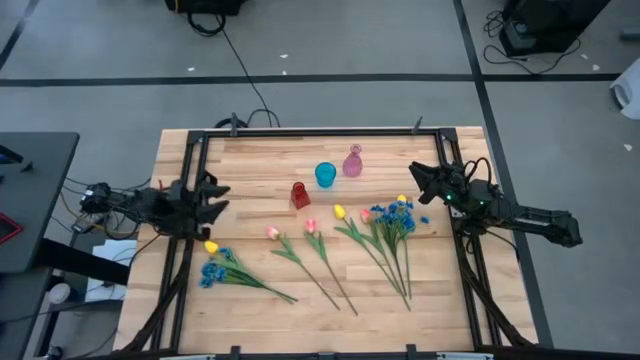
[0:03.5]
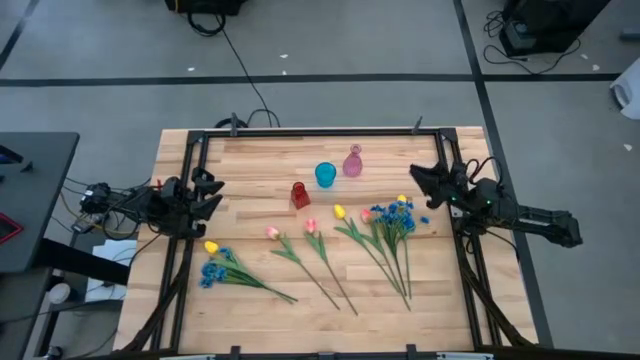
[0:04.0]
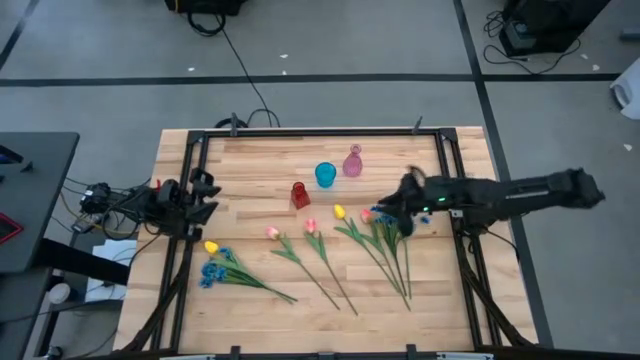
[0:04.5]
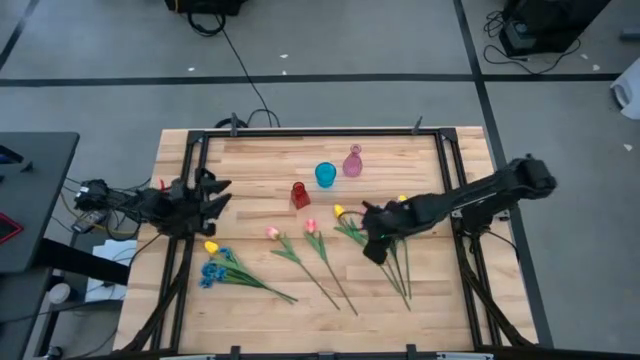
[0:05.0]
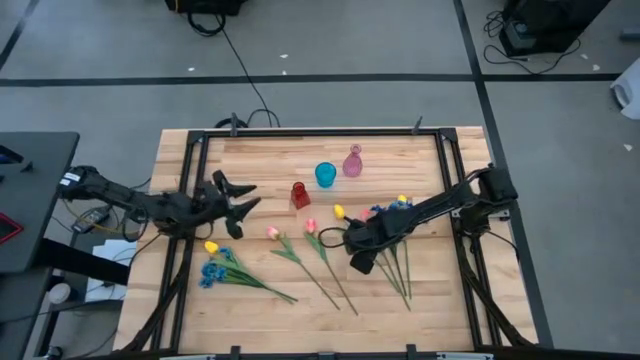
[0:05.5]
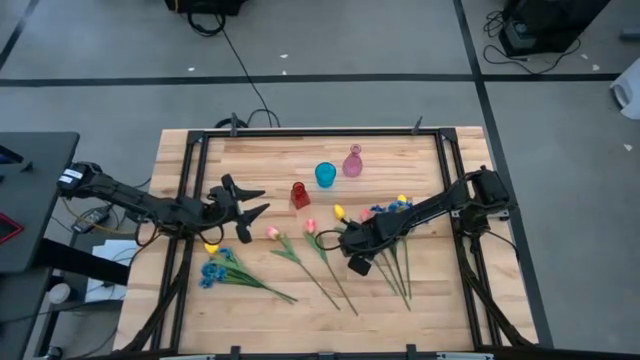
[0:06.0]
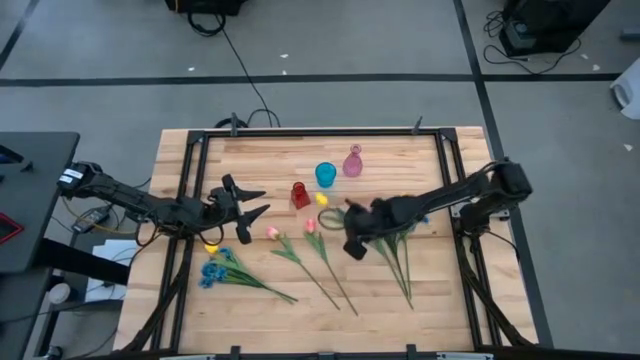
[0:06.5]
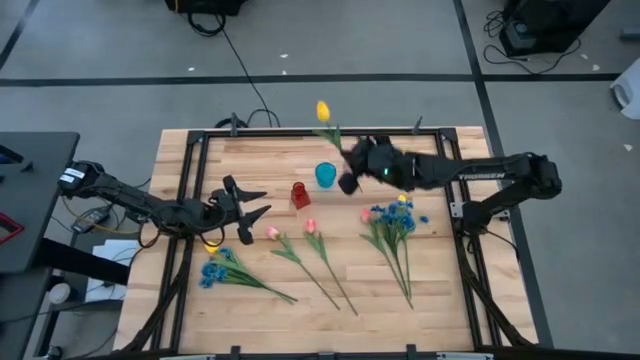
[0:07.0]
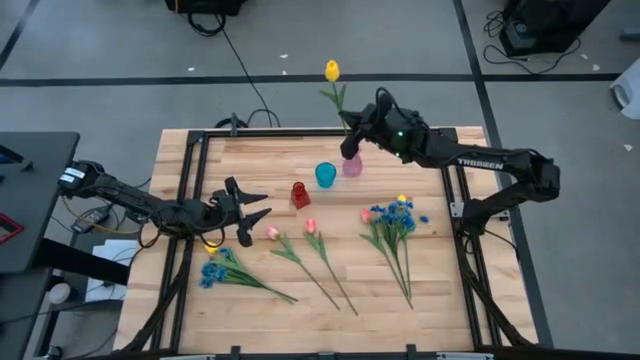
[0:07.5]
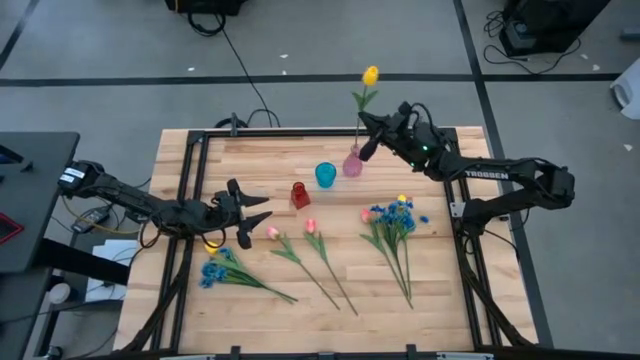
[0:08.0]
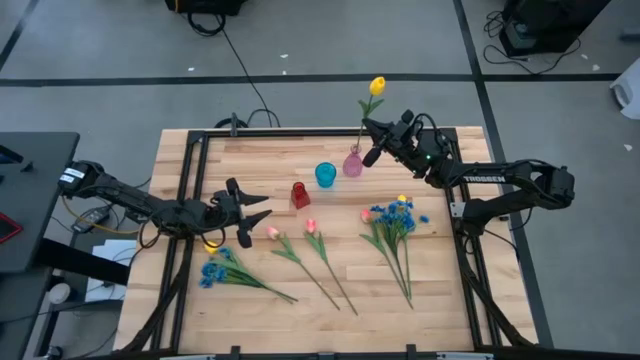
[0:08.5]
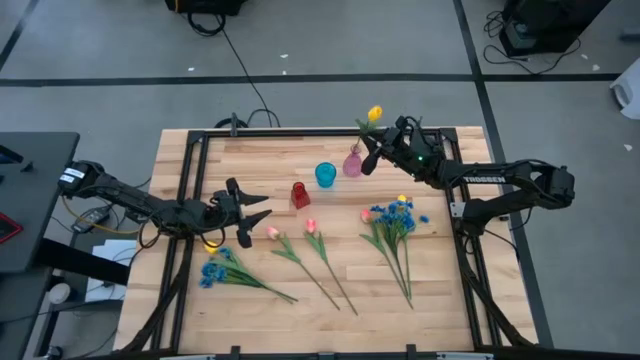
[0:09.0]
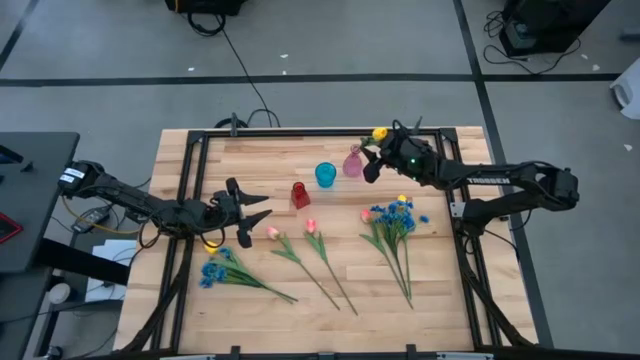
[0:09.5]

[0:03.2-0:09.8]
Task: Sort flowers into vase by color
Put the yellow flower into the purple vase

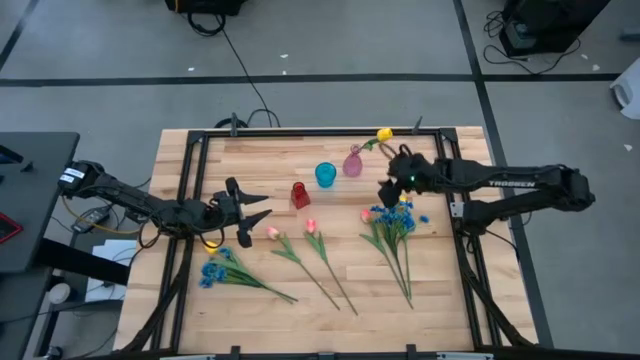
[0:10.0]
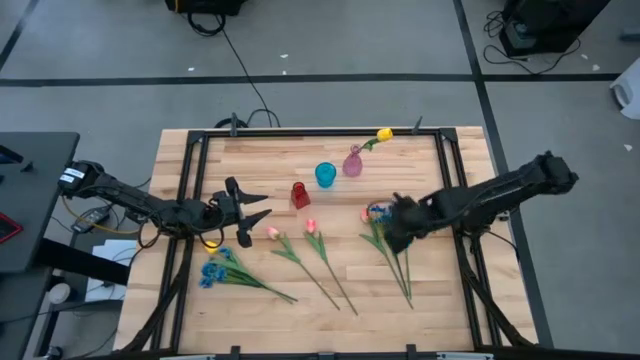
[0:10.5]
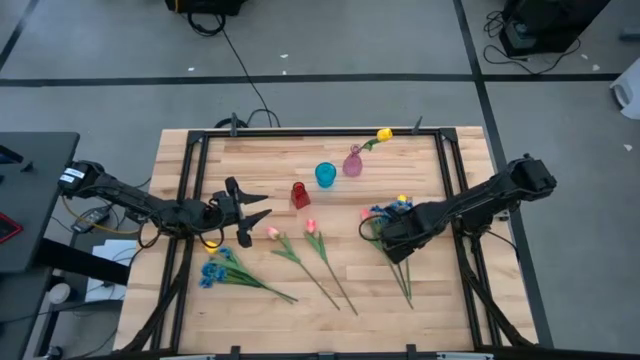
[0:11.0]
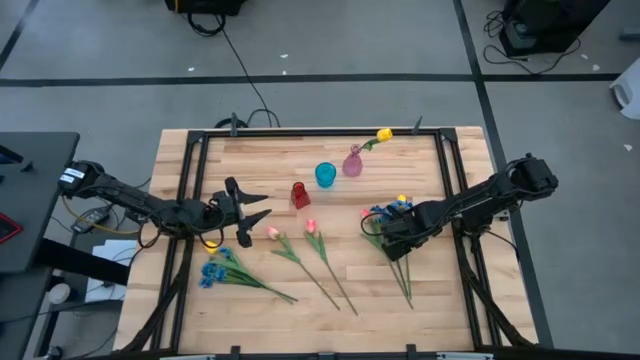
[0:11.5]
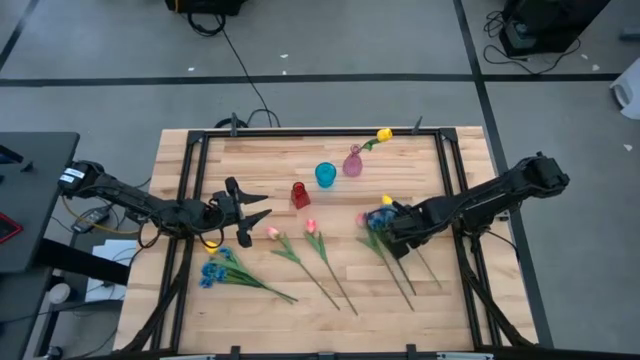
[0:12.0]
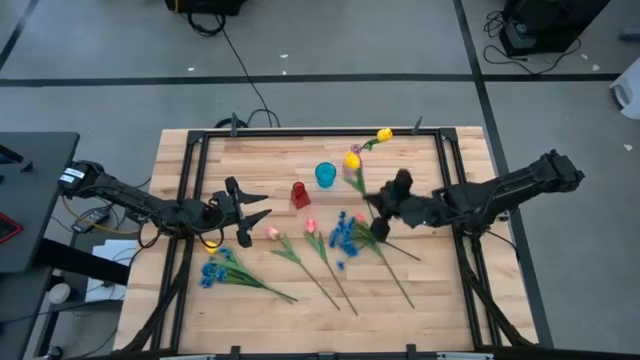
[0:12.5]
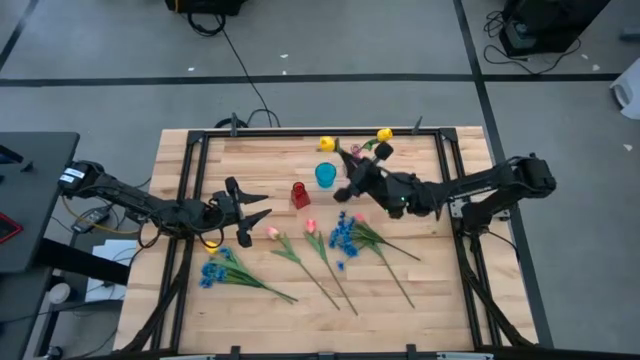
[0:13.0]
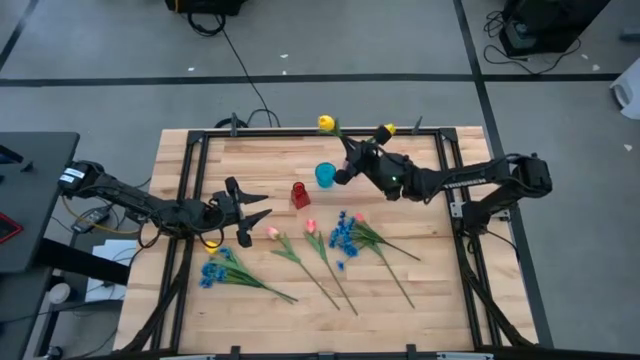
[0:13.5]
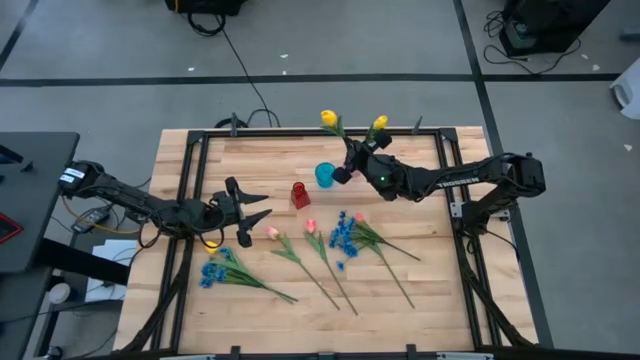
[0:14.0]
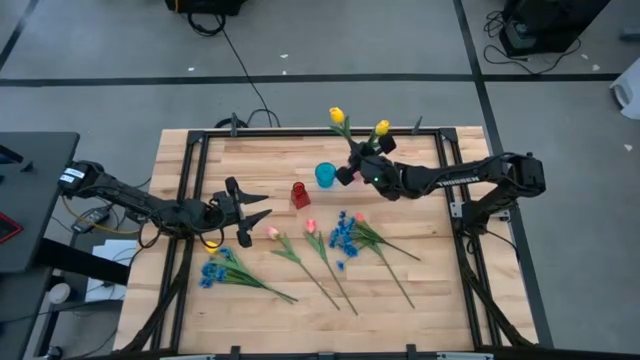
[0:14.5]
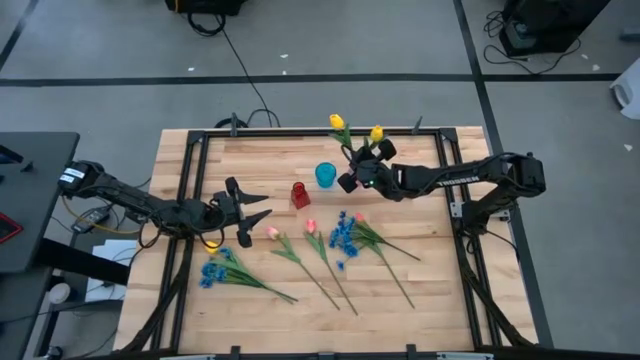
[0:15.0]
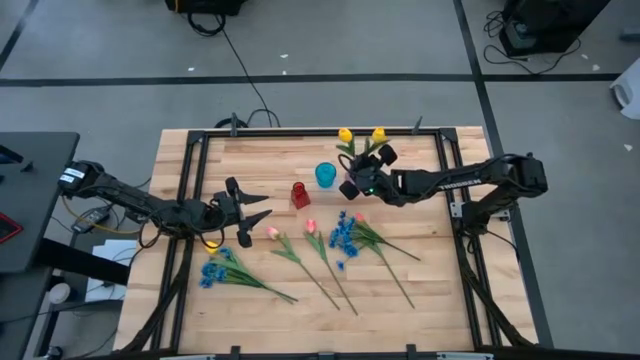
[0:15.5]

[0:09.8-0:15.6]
Put the yellow flower into the purple vase

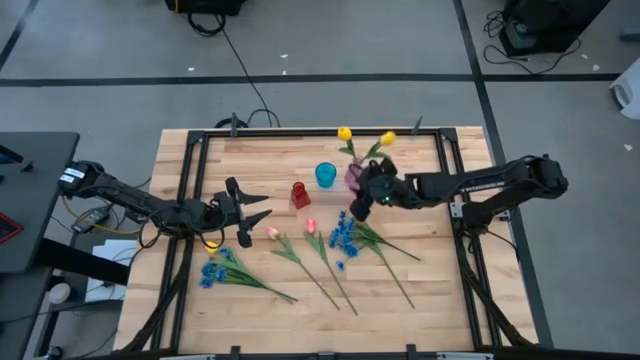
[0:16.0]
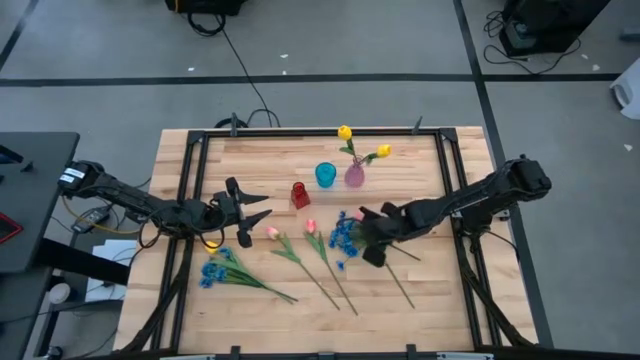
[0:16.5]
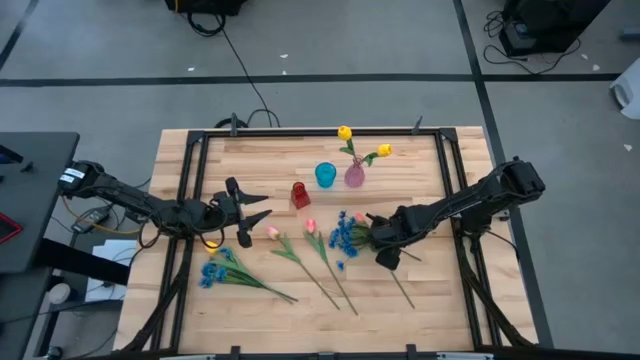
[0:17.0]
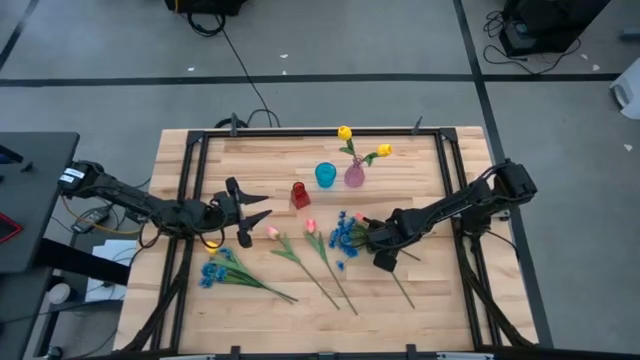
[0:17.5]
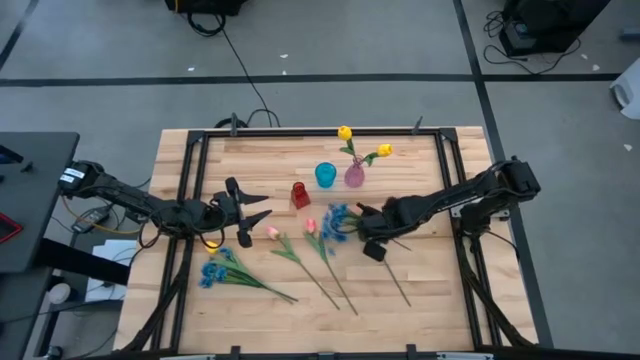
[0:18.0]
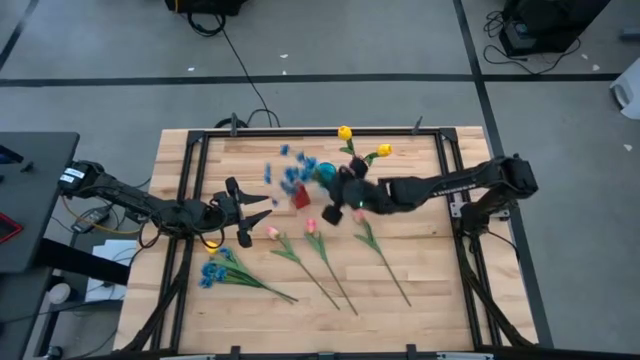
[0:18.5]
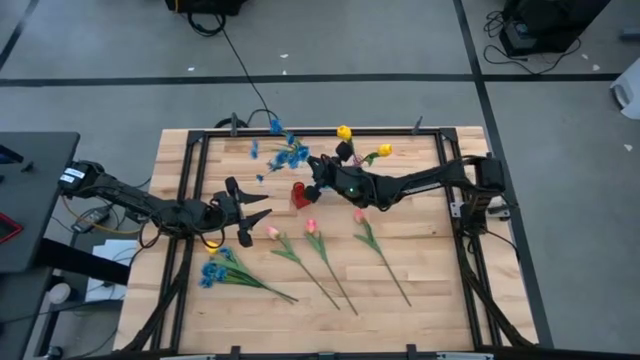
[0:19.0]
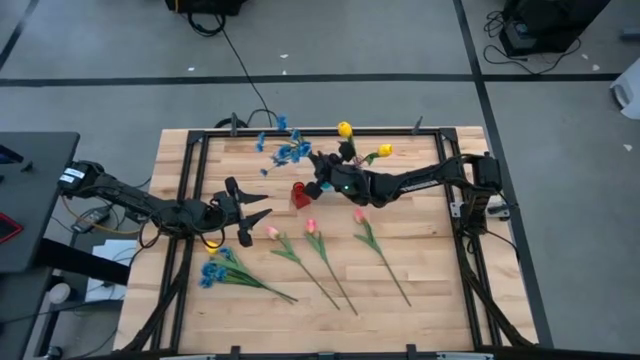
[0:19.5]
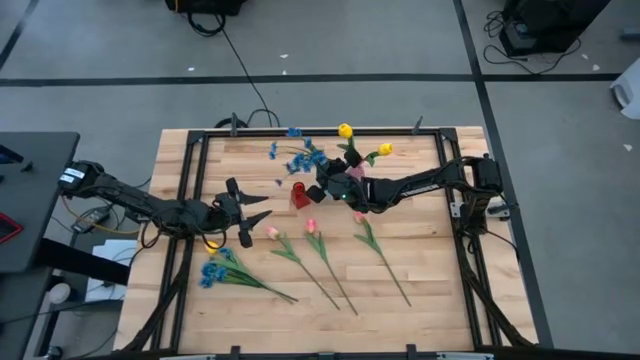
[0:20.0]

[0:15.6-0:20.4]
Put the blue bouquet into the blue vase

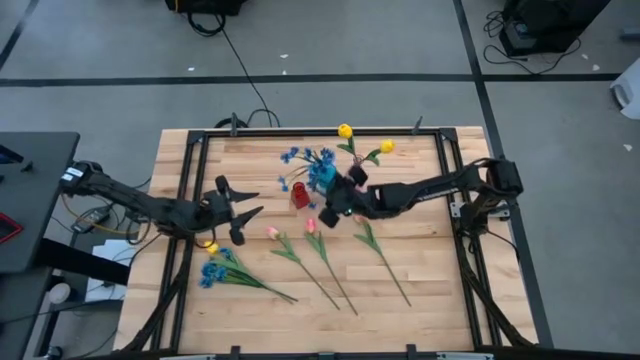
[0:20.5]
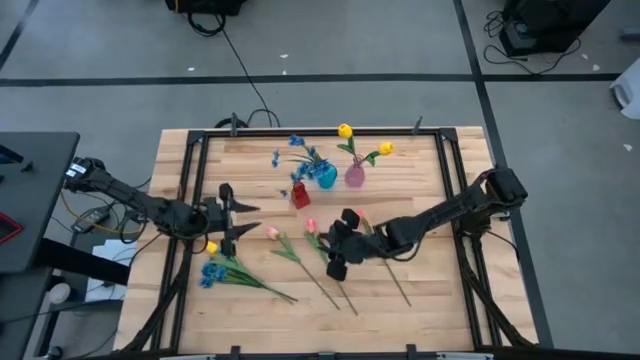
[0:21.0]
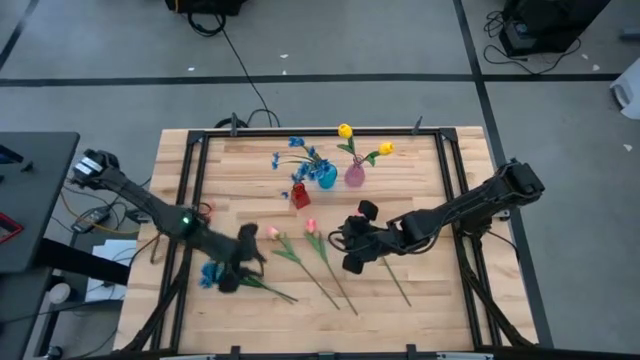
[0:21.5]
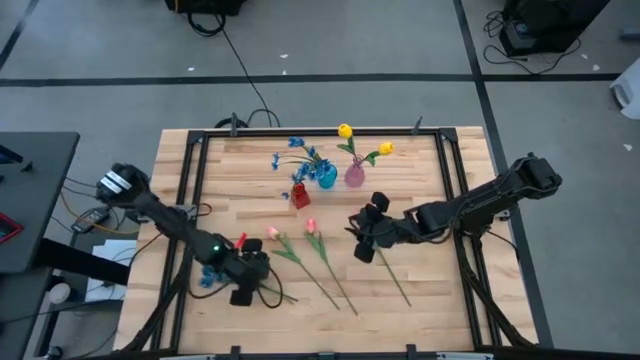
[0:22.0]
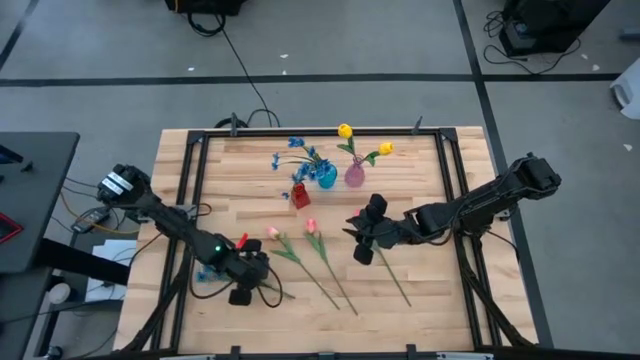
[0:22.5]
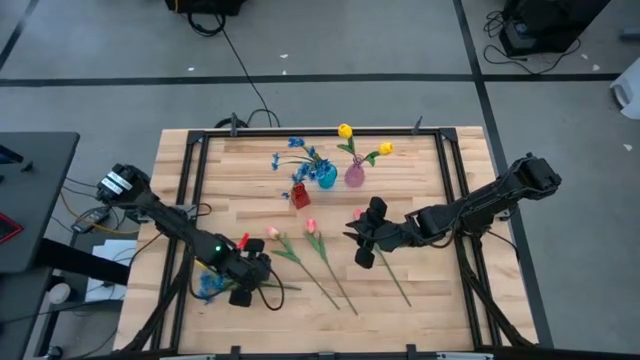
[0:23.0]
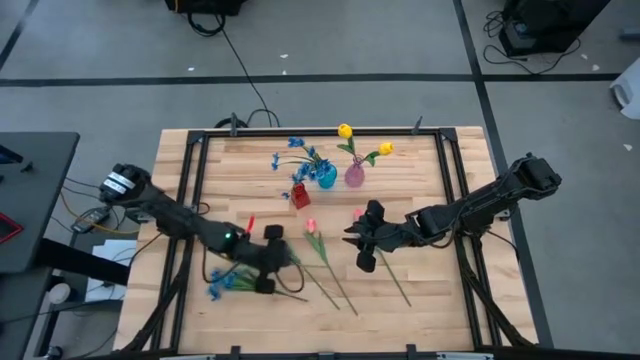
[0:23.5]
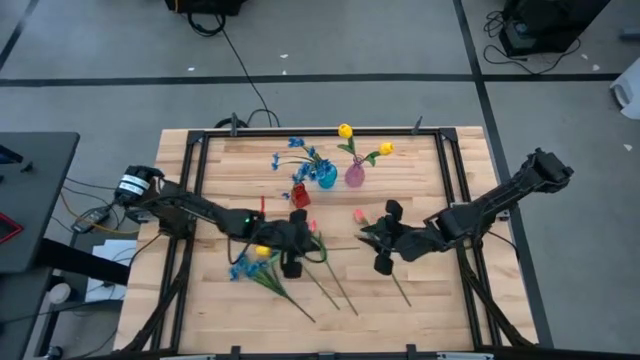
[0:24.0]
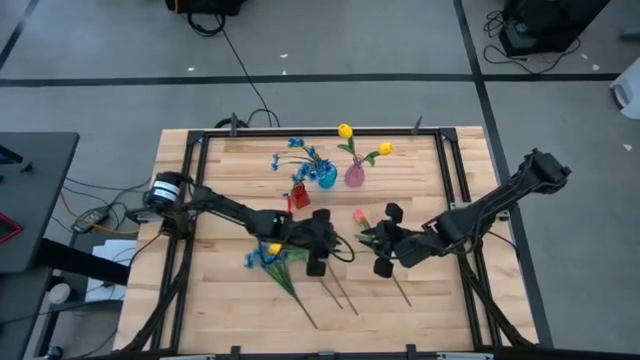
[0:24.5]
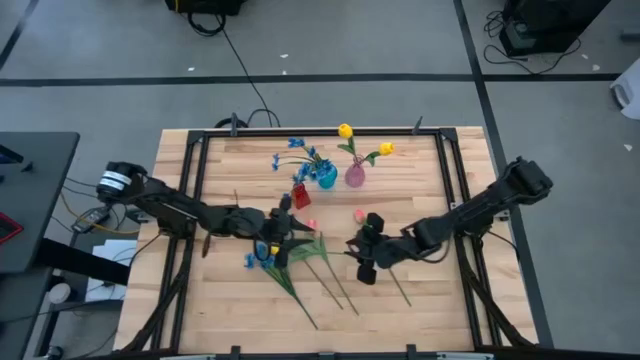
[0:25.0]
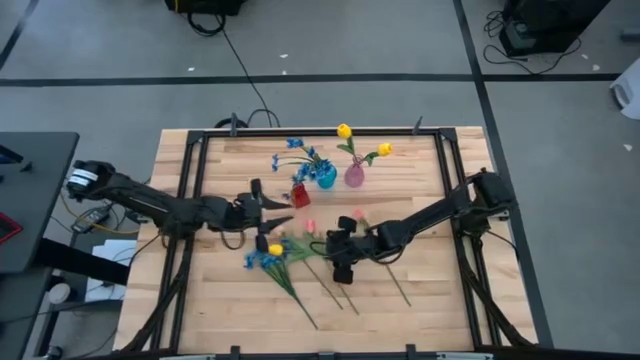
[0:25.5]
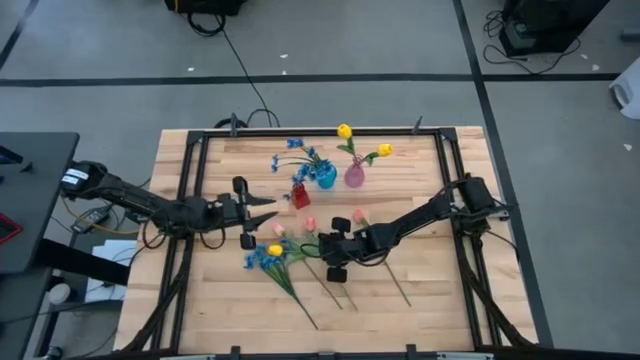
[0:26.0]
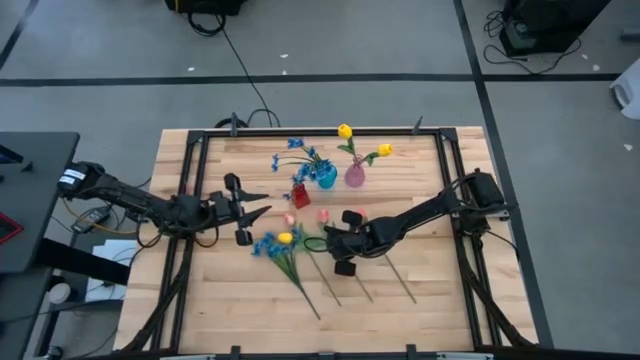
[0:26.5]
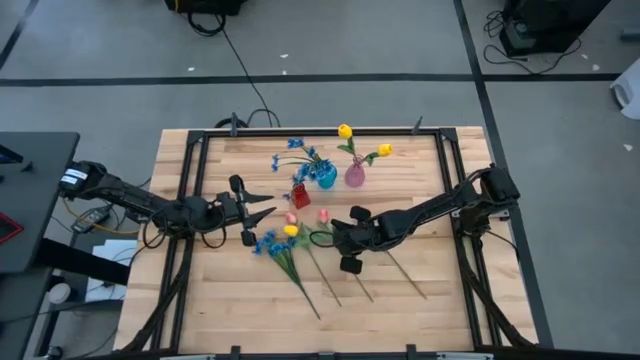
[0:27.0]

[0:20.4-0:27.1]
Put the yellow flower into the purple vase
